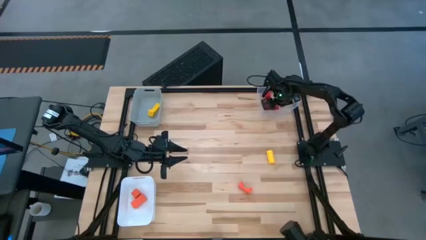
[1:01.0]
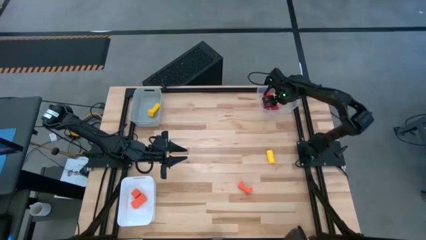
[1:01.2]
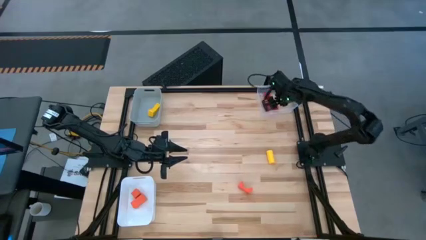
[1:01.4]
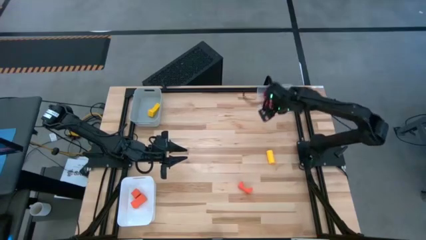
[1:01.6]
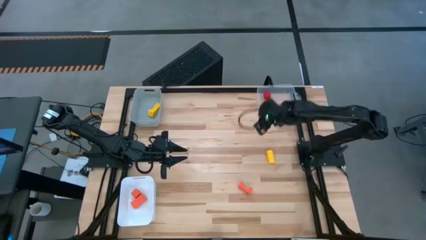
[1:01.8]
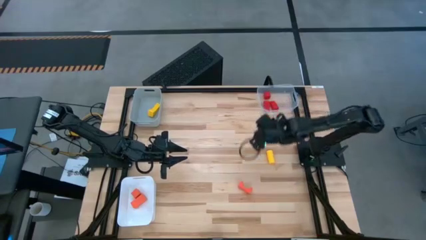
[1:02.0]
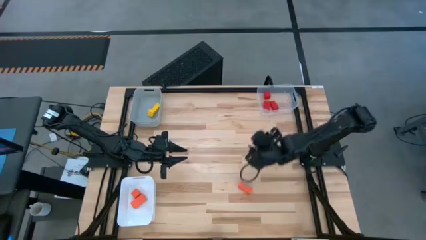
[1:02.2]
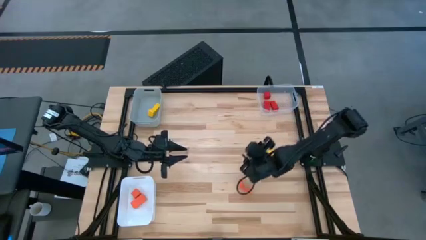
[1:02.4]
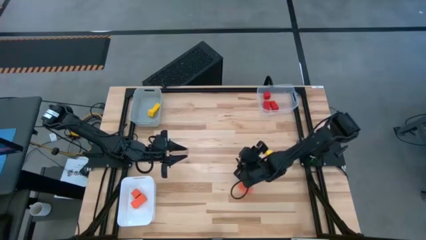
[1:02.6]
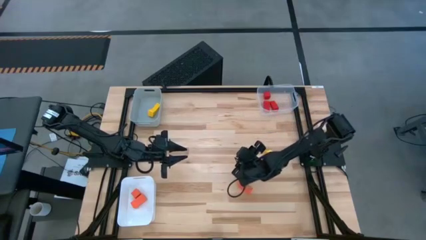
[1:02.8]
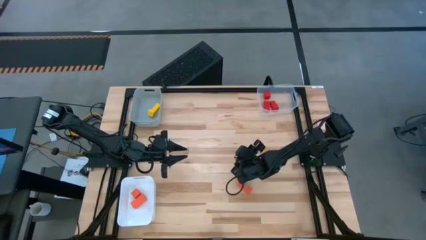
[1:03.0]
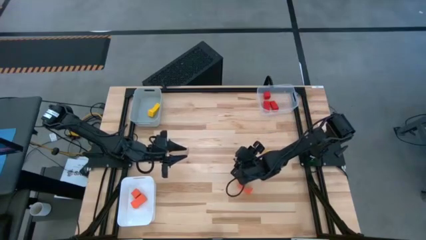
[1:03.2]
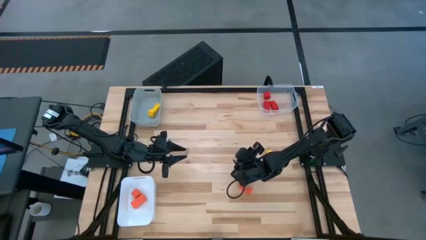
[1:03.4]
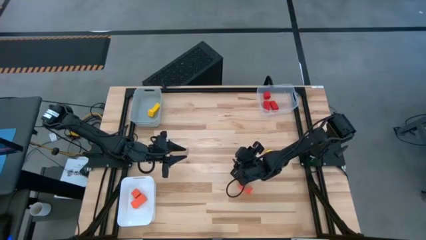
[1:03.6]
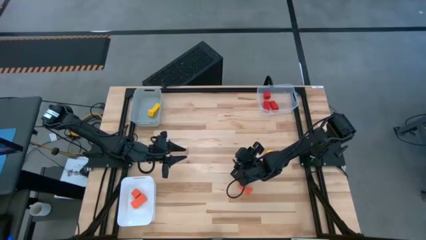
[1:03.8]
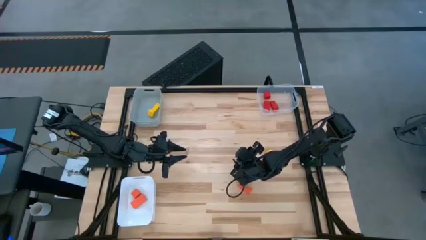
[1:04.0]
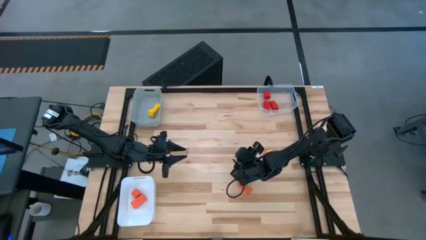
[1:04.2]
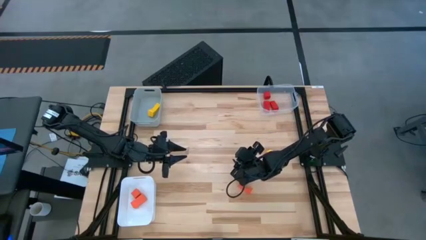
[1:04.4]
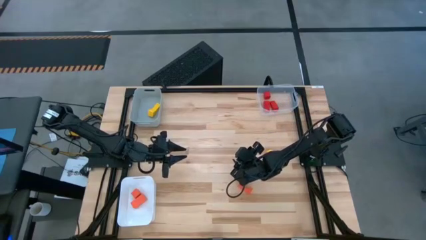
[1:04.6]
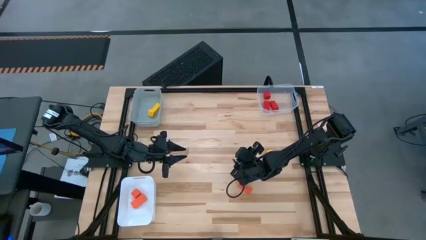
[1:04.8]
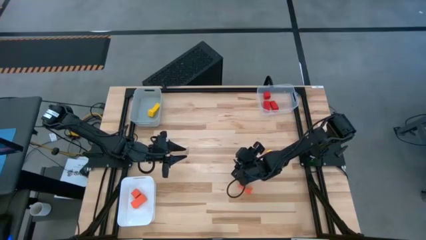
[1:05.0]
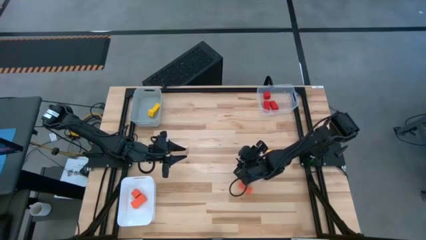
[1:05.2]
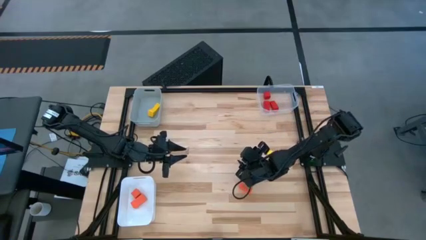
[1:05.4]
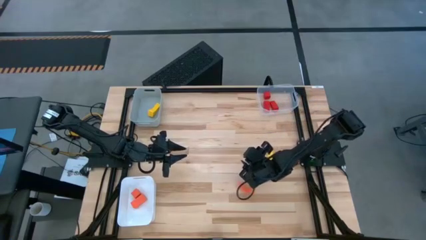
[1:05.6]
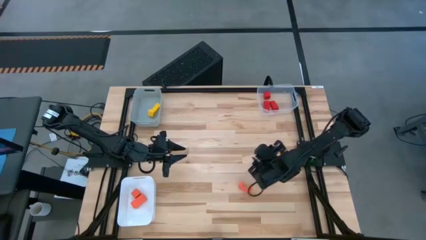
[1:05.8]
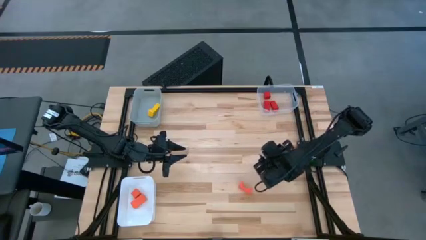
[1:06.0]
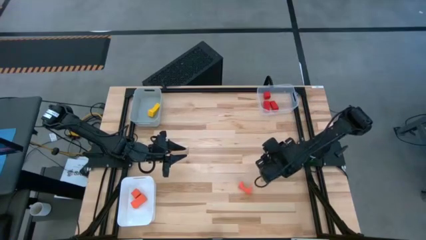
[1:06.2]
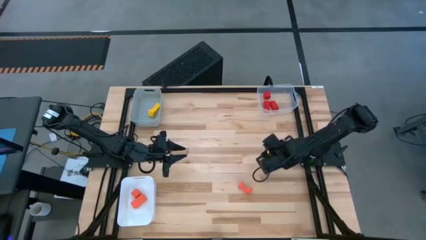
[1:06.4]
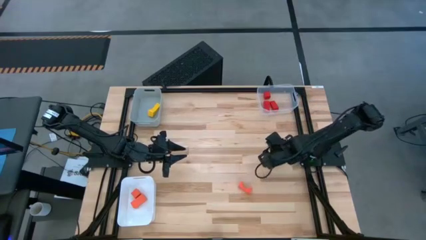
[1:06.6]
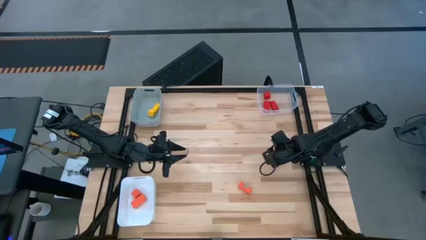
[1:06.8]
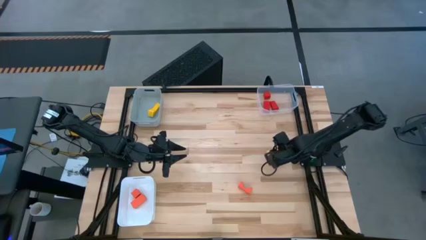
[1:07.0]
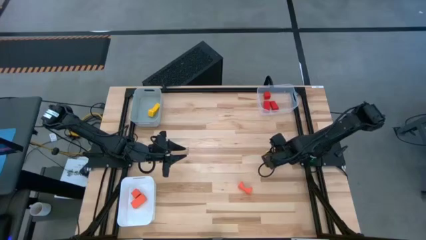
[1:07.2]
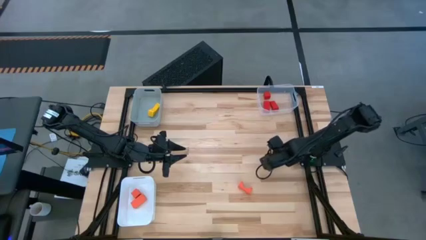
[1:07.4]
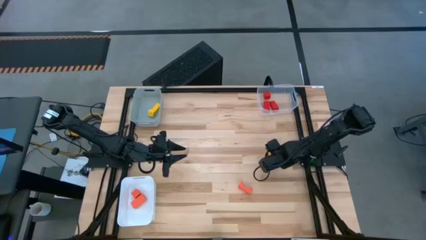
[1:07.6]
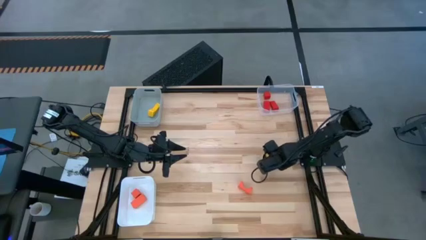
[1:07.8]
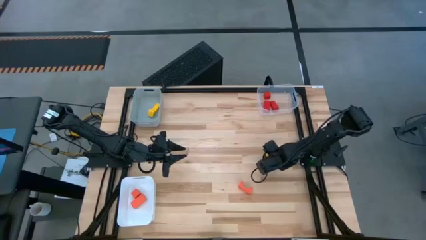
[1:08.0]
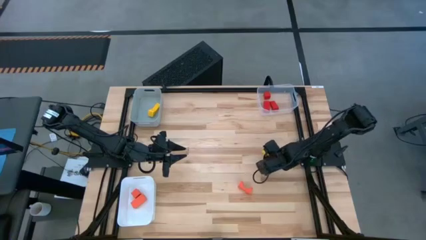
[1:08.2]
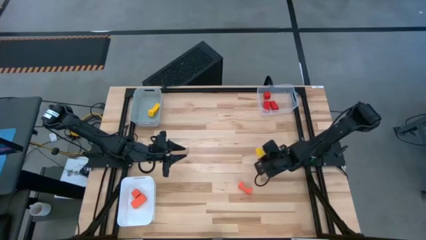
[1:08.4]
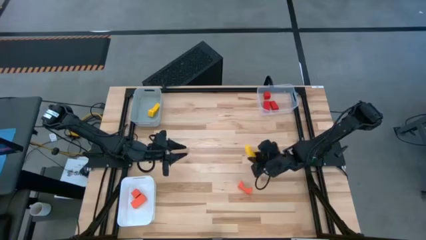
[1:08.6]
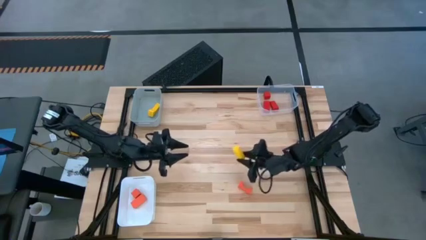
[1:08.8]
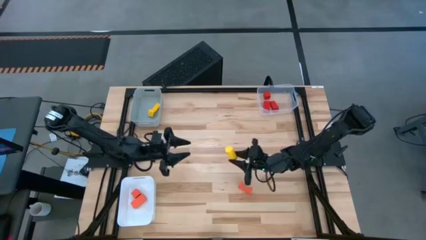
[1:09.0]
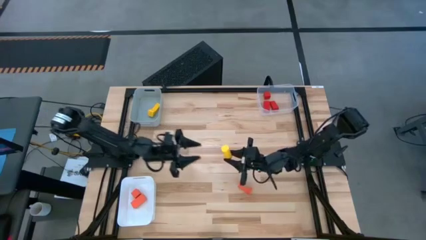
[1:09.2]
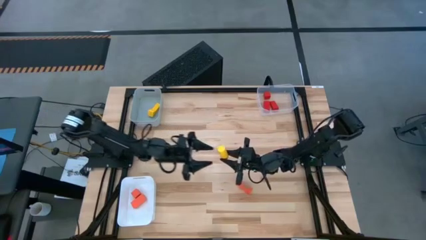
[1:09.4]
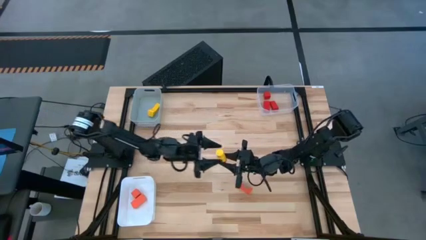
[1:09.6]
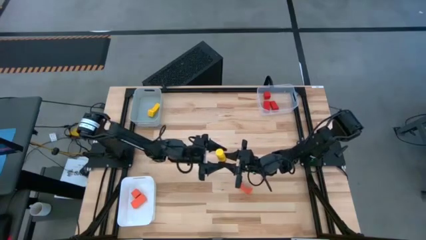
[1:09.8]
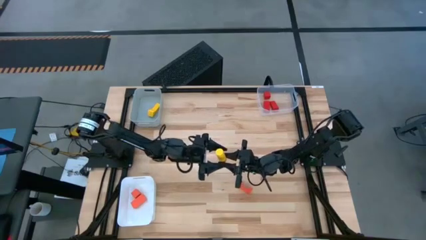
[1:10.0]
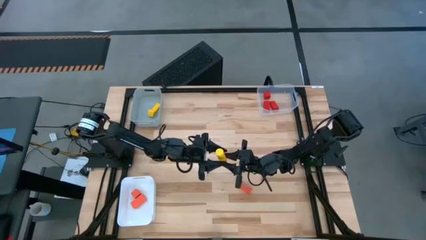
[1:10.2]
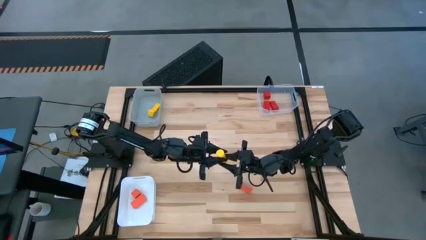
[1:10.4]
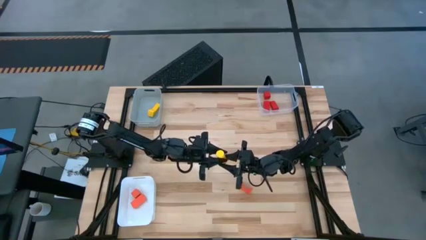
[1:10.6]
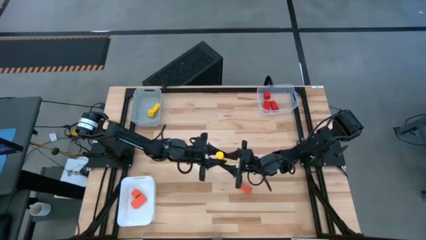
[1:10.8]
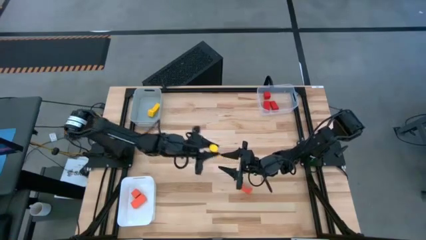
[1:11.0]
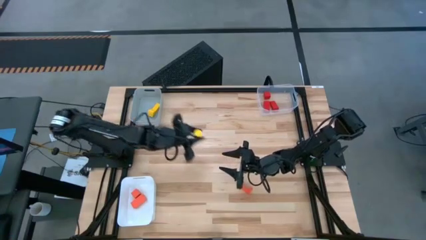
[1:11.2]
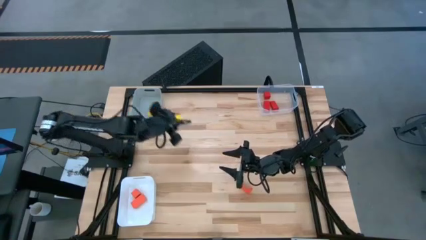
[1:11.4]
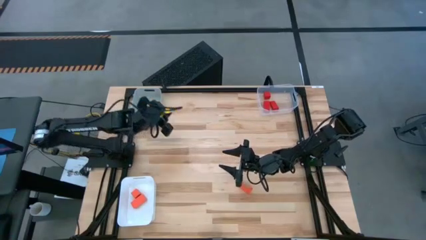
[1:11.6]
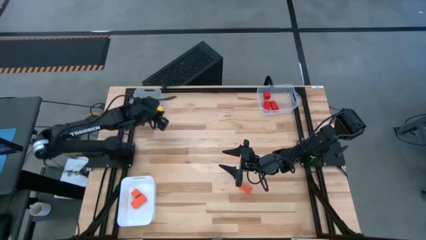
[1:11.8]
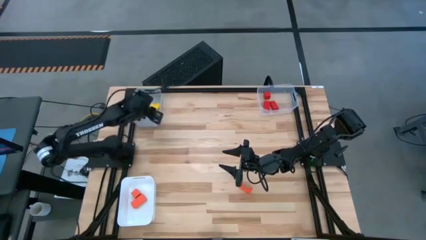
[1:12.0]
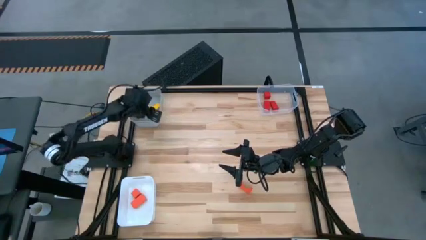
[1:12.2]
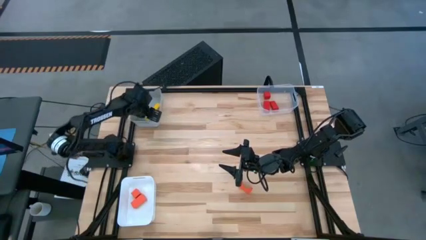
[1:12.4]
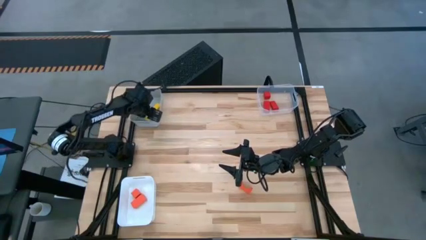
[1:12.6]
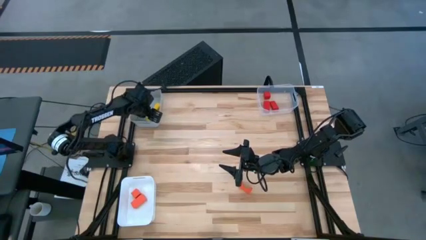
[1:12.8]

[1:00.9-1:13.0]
Task: Sort & place blocks by color
Put the yellow block into the gray bin

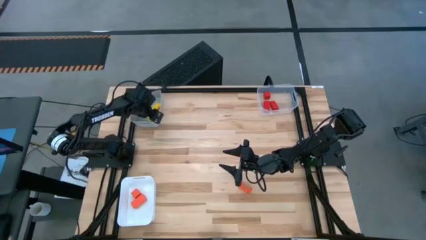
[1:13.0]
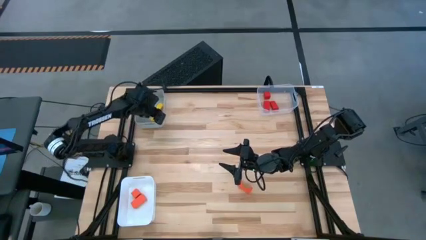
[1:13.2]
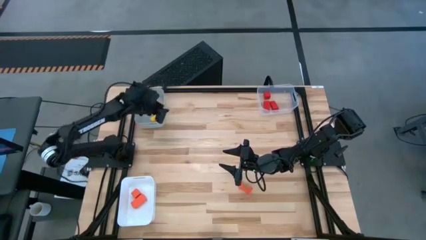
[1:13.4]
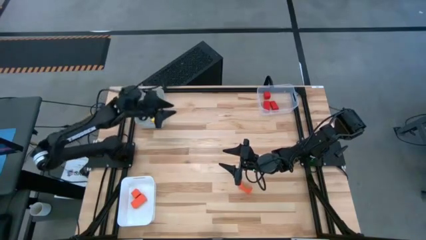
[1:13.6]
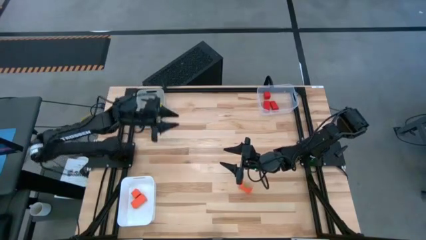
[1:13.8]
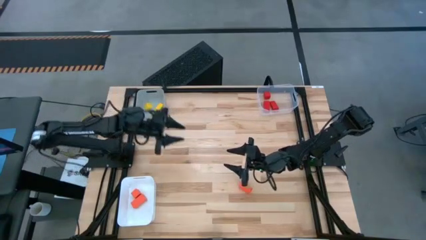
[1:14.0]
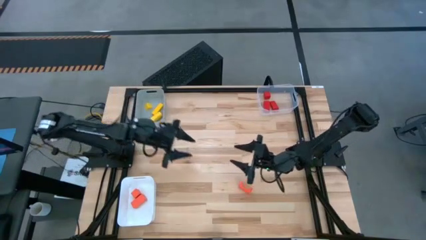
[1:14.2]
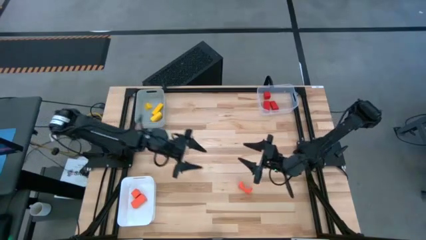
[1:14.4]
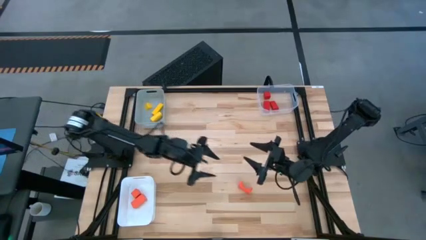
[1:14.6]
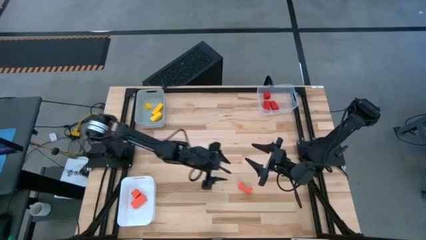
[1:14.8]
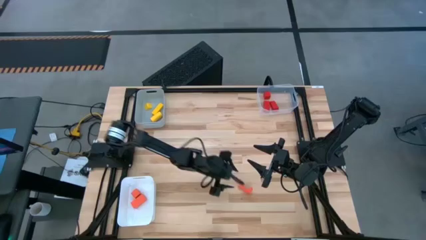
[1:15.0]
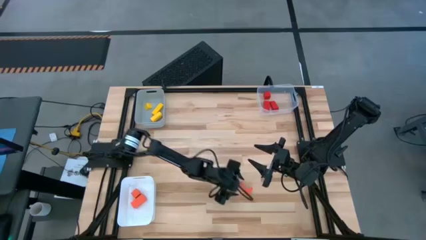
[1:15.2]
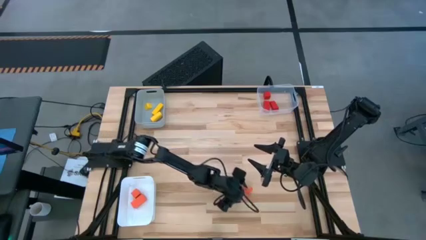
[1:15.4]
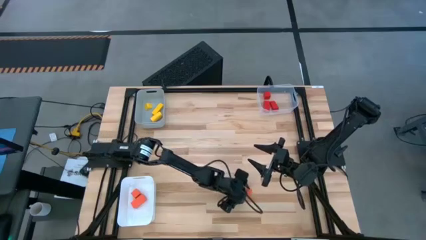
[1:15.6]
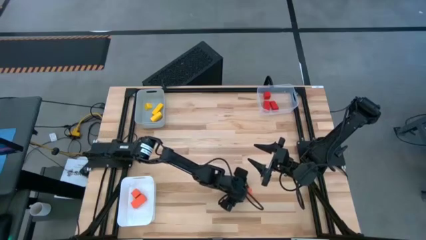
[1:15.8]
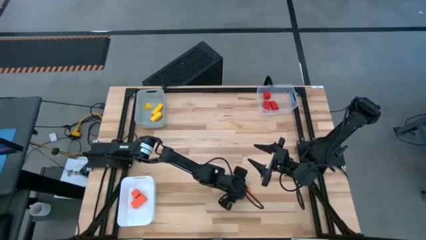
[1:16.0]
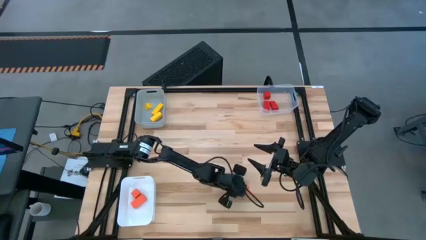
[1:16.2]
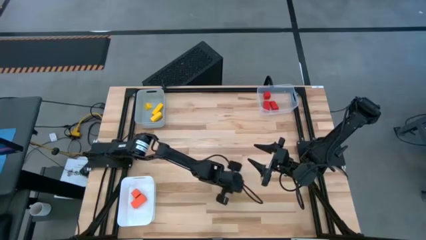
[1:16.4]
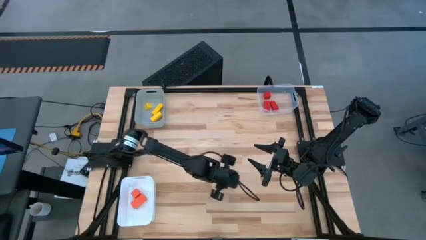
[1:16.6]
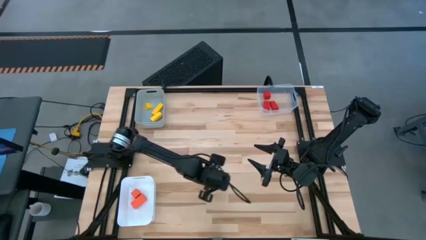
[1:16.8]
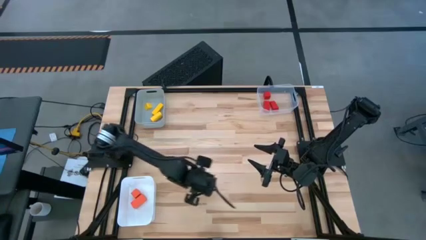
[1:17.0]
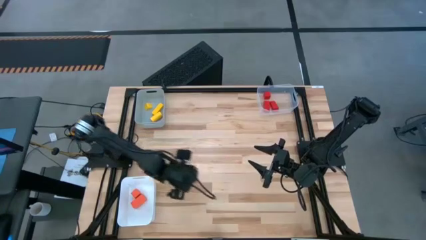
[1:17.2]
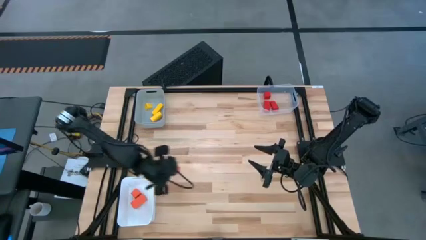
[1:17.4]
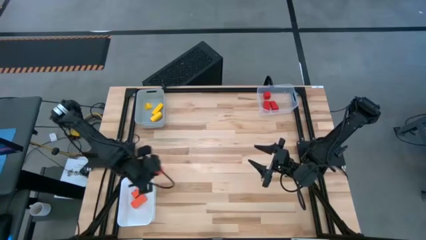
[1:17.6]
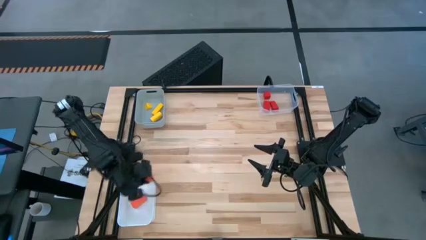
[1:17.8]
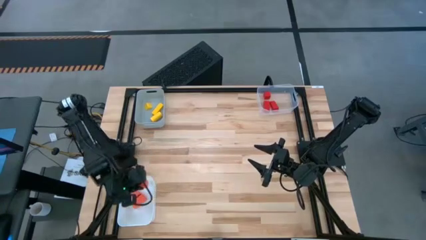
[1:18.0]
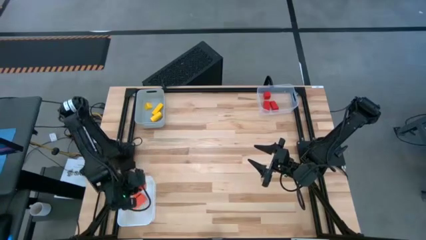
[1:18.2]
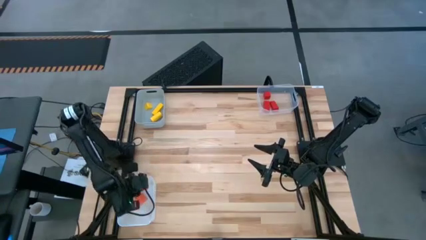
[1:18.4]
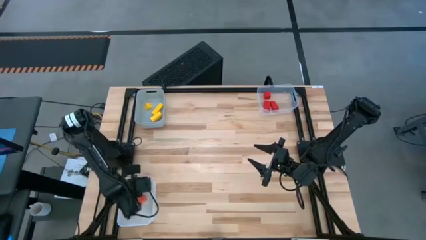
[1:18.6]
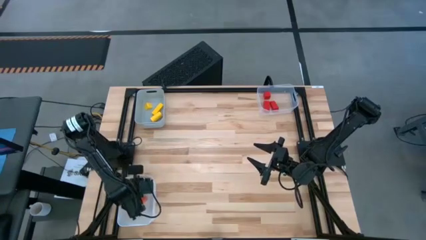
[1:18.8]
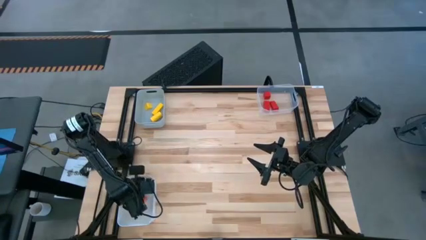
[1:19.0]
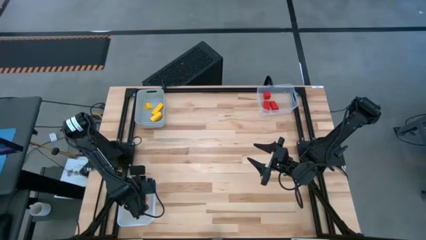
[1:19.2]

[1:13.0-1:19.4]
Put the orange block into the white bin
